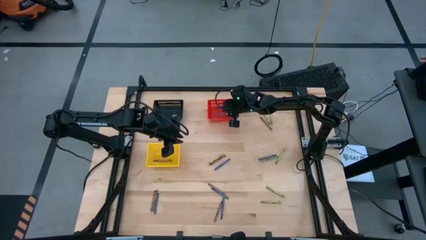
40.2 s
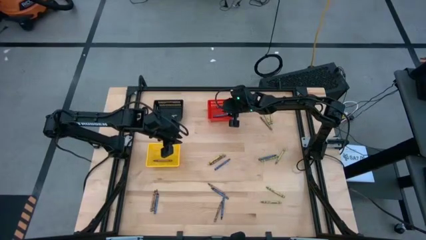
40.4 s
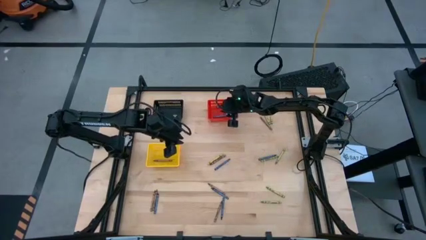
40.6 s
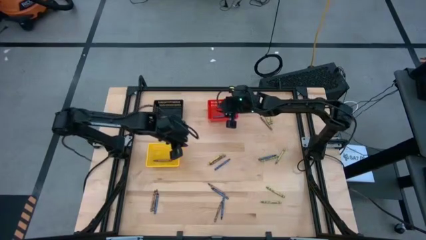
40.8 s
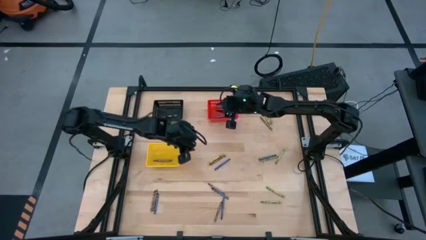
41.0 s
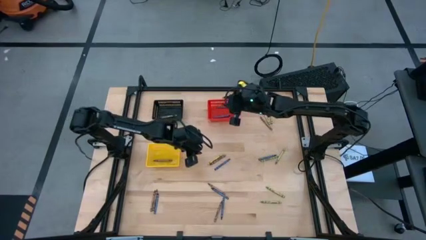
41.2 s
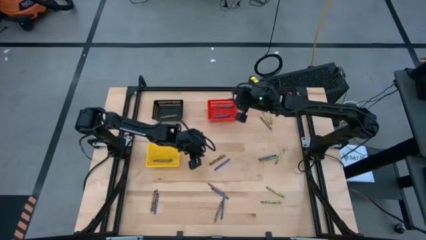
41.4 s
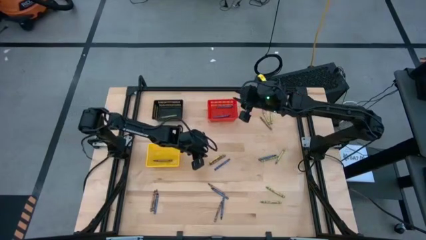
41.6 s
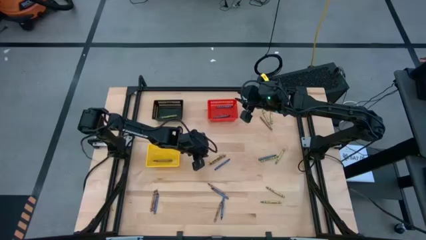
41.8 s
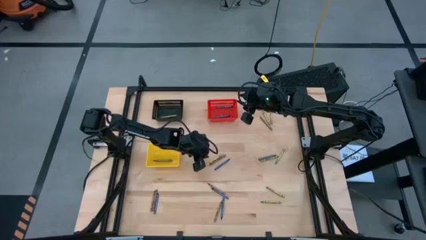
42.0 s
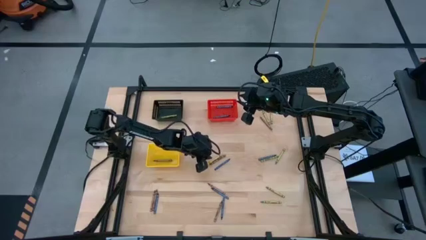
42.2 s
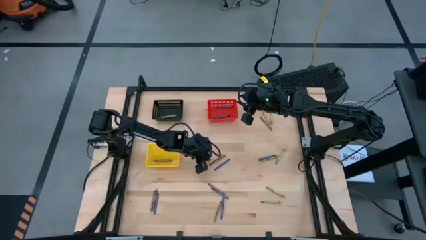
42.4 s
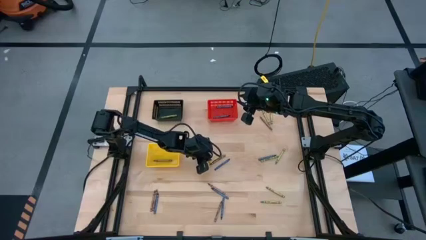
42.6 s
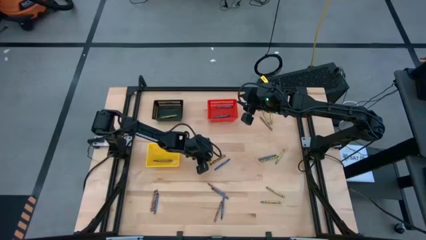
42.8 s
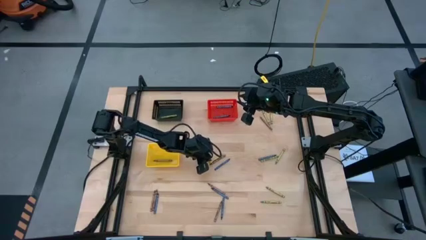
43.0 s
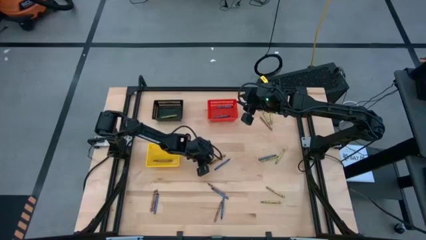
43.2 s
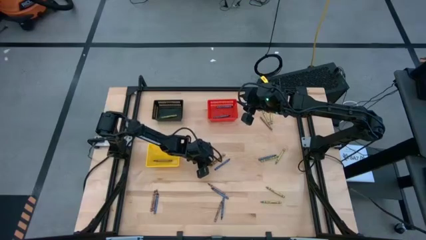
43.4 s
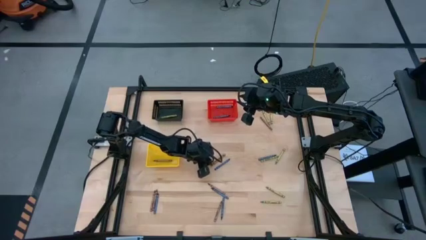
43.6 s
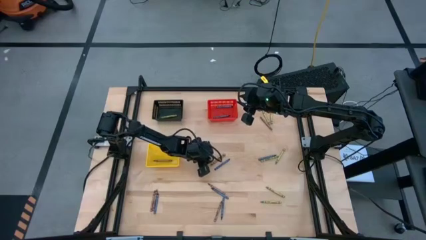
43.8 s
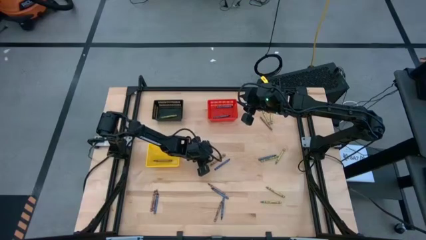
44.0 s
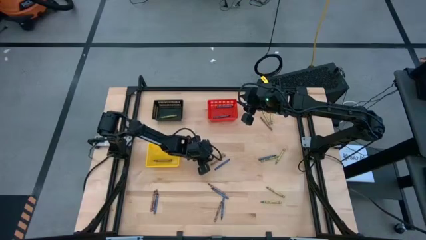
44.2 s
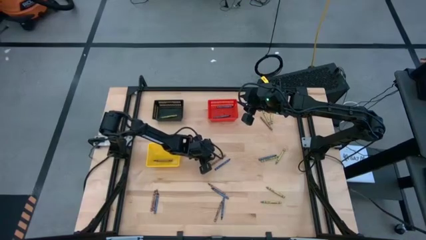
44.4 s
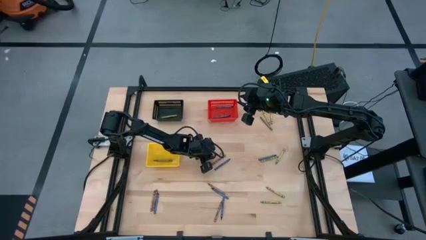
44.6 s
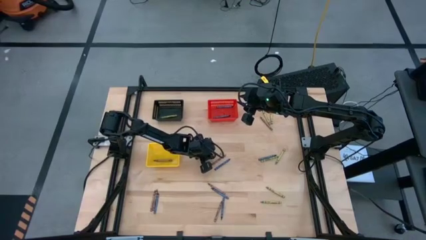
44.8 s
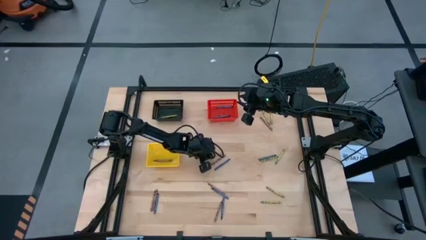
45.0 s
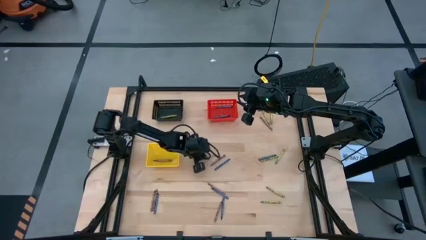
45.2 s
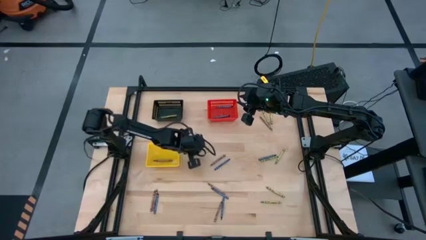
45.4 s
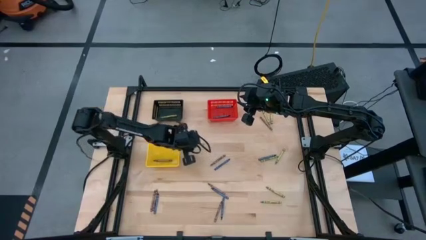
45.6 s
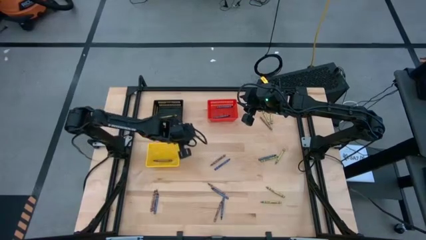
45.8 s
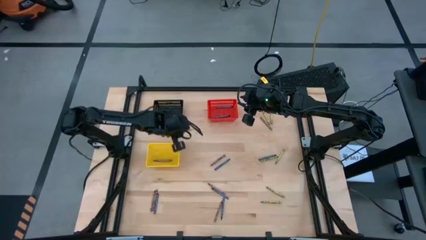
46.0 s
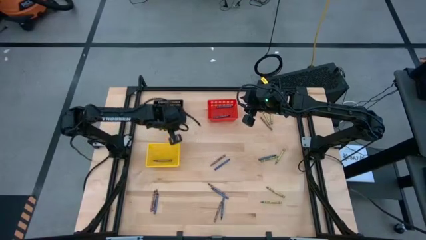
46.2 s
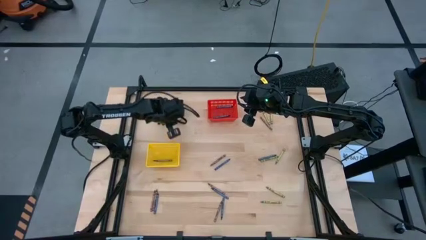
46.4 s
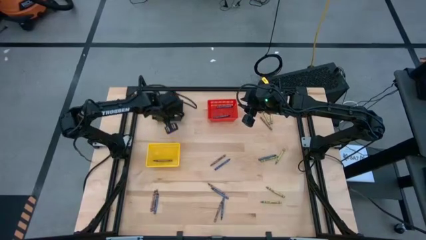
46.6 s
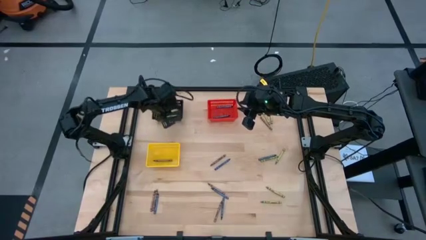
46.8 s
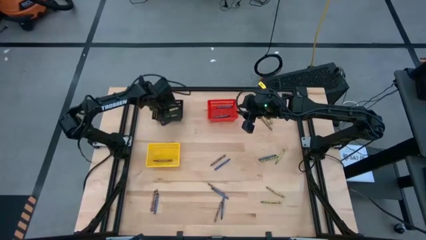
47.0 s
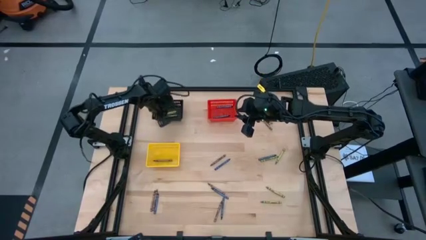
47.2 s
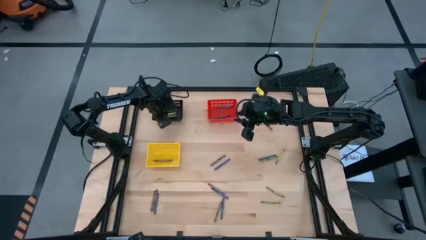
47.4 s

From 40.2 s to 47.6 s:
Task: Sort crayons
Put the green crayon into the black basket

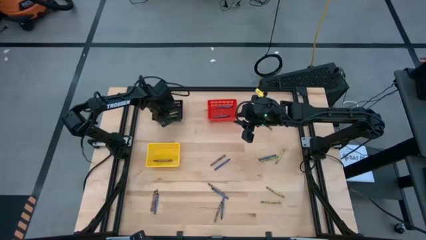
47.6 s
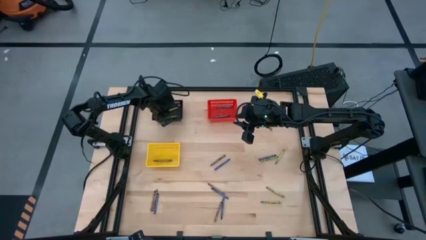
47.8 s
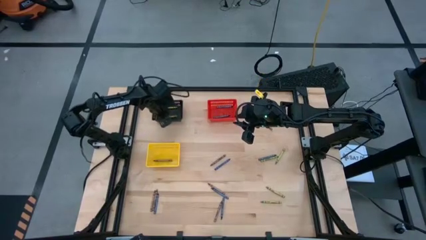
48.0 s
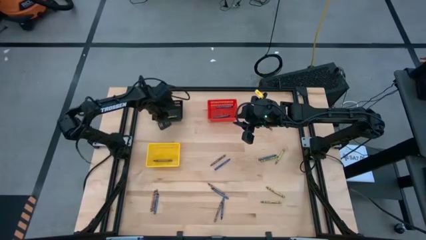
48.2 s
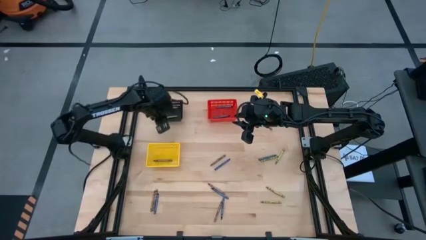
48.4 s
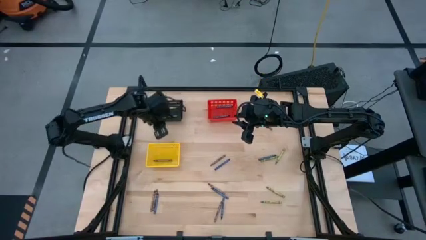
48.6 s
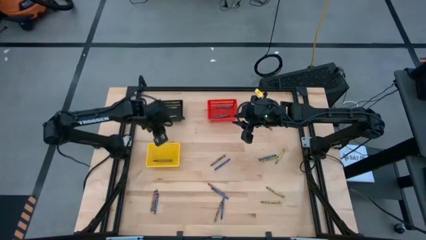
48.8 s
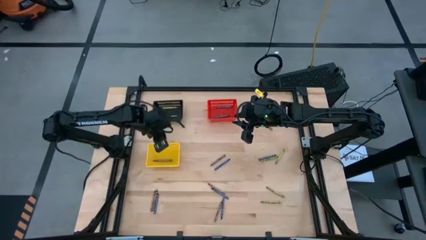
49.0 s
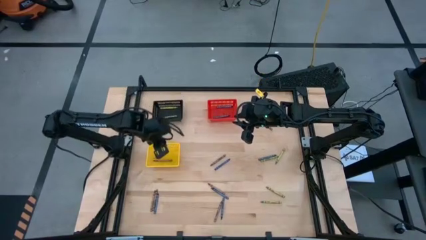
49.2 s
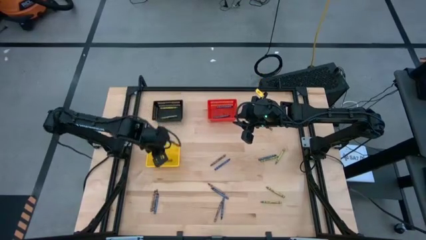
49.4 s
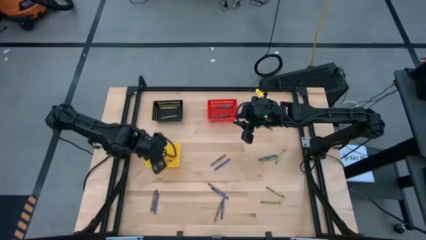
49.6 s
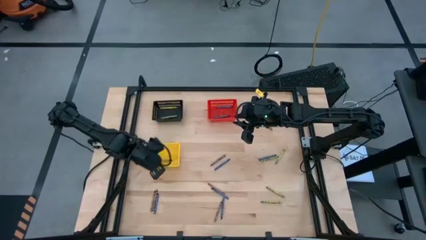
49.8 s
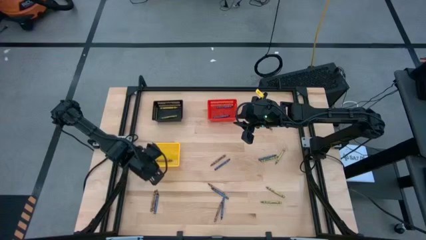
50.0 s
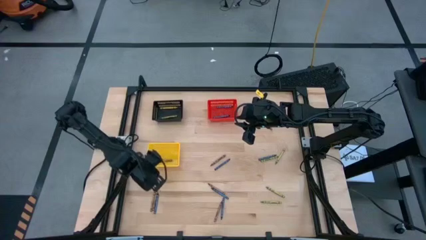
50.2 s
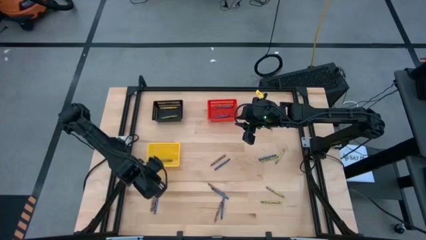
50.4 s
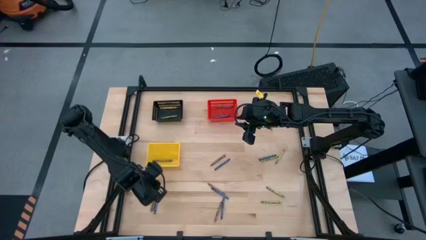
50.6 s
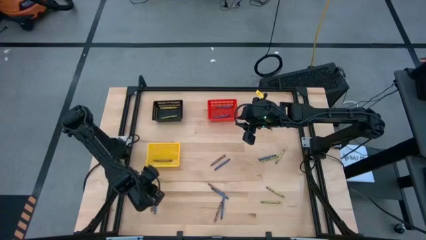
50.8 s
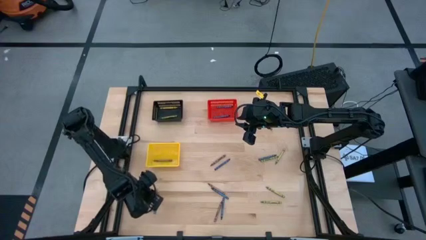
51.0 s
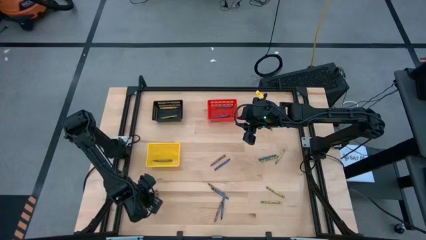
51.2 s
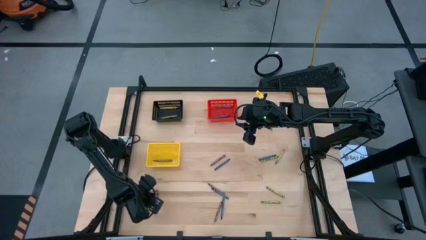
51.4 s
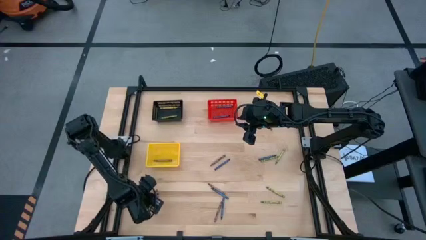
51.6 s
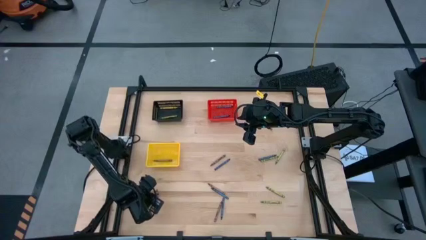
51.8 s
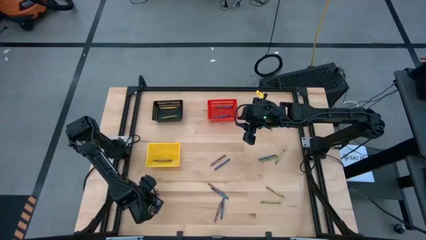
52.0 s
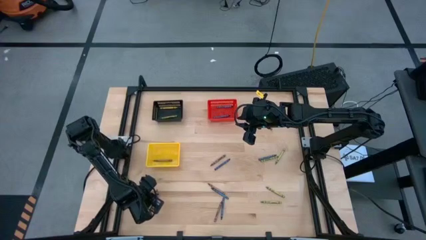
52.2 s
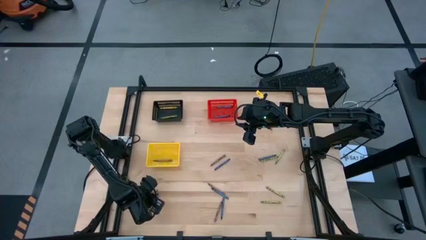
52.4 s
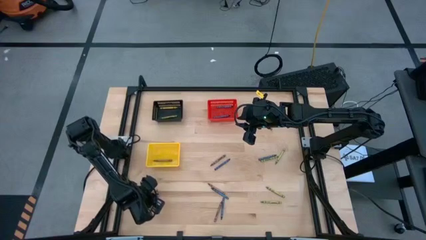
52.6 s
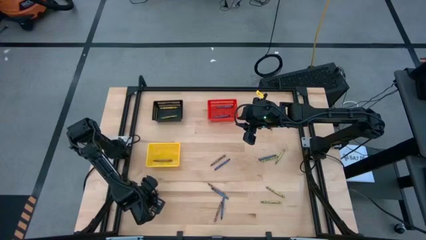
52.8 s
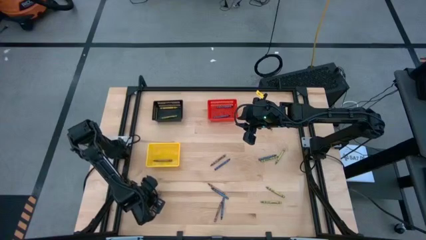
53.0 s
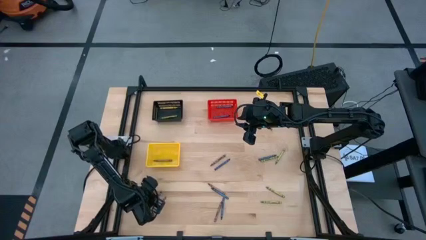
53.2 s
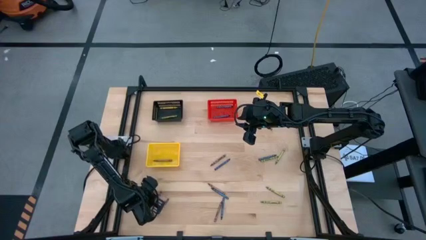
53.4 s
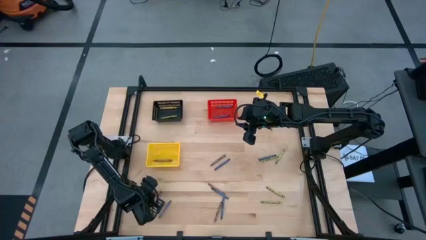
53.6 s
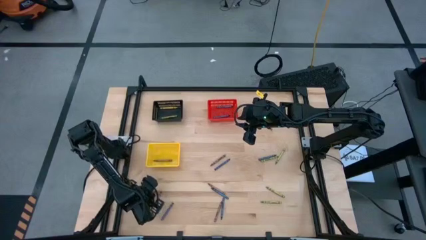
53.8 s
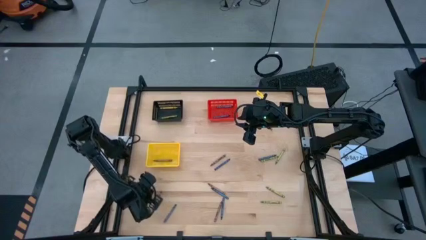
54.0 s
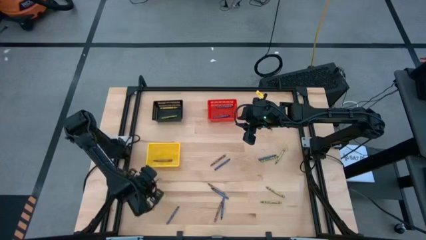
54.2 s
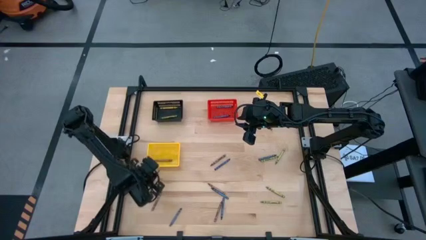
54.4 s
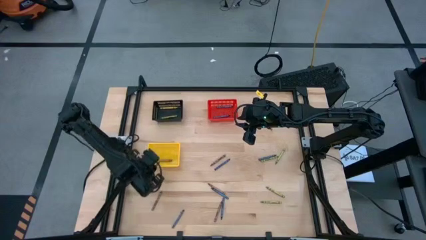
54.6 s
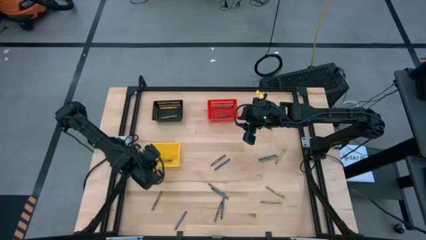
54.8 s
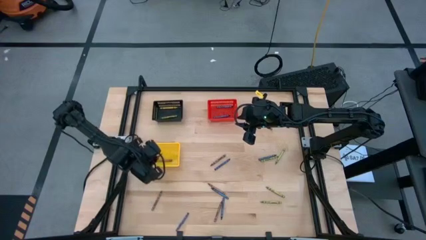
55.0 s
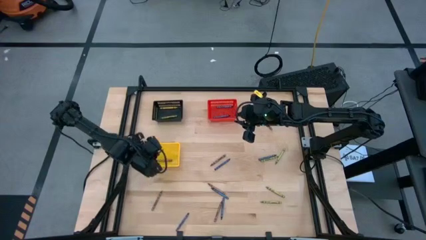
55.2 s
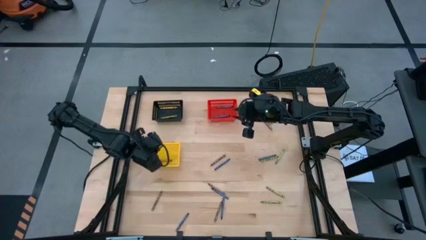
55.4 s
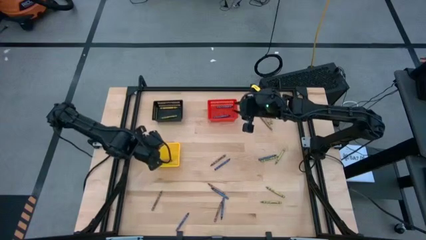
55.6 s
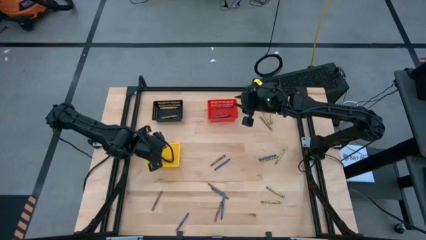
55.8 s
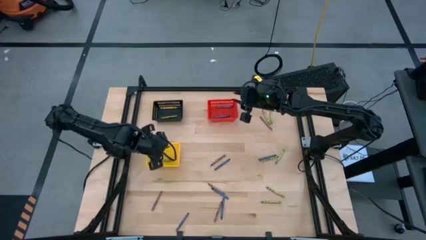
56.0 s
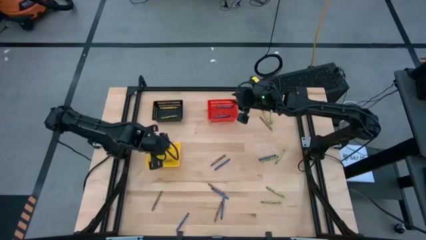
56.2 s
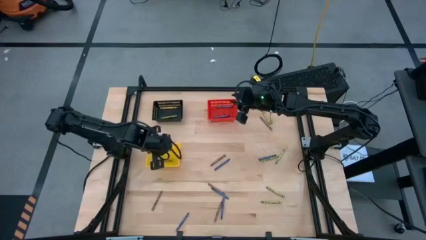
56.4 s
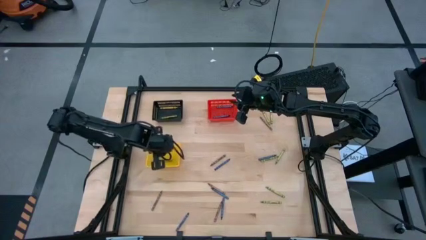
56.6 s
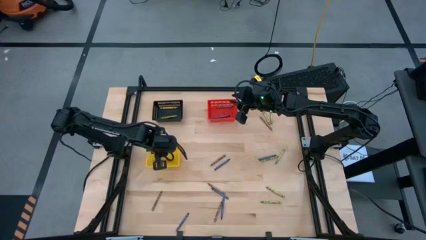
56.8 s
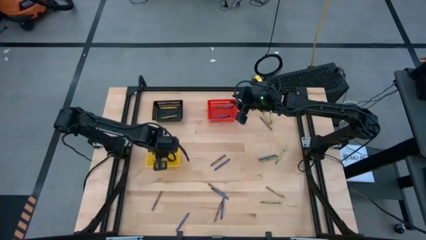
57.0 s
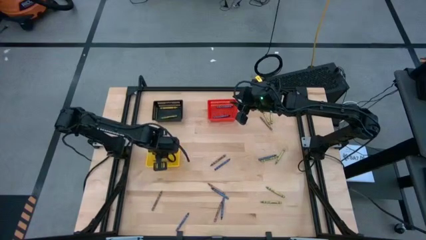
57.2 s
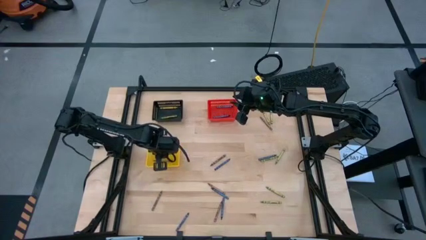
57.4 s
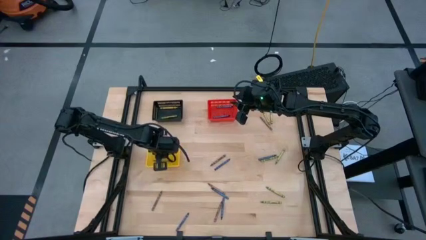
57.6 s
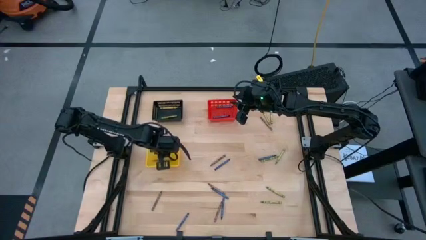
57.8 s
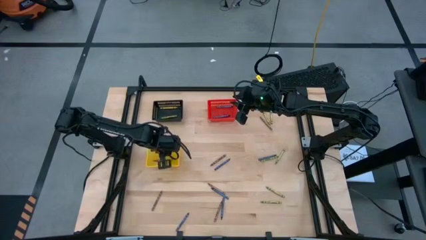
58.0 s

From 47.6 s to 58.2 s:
Put the brown crayon into the yellow basket
